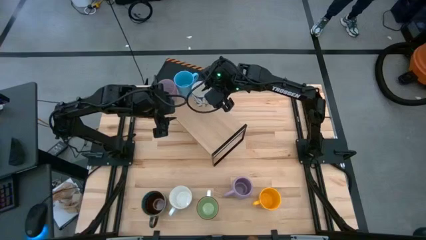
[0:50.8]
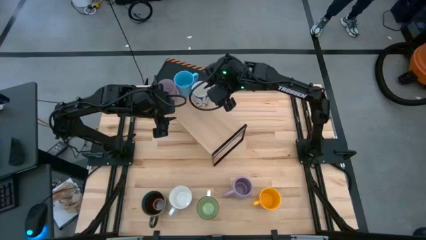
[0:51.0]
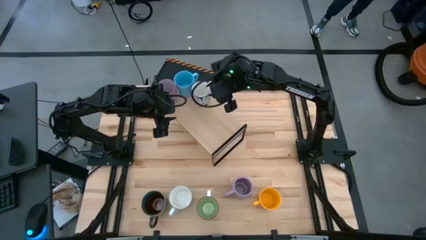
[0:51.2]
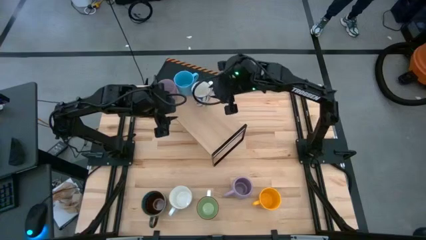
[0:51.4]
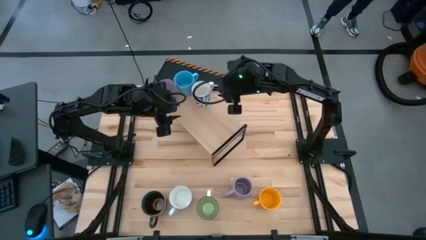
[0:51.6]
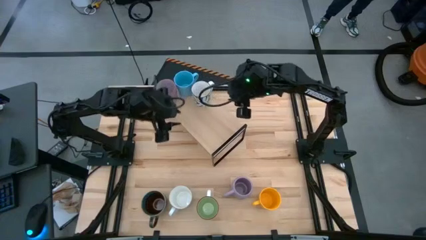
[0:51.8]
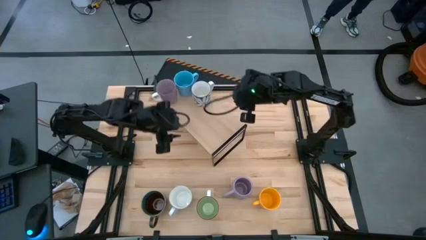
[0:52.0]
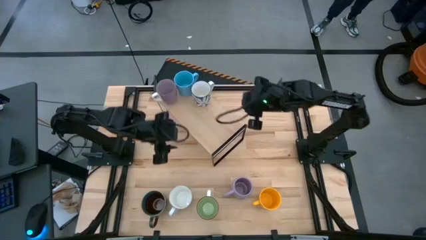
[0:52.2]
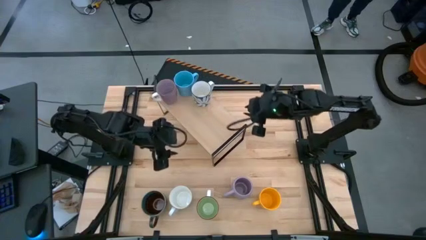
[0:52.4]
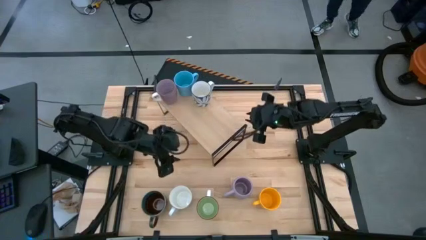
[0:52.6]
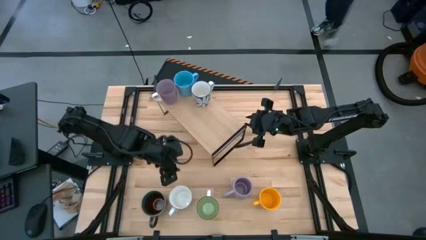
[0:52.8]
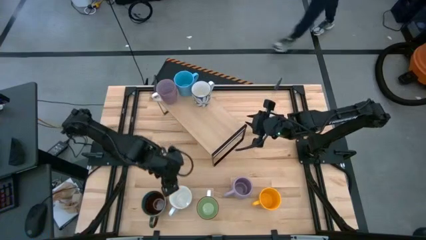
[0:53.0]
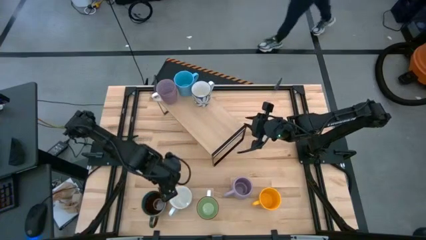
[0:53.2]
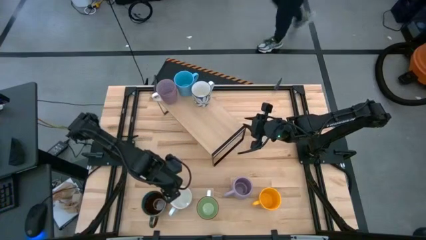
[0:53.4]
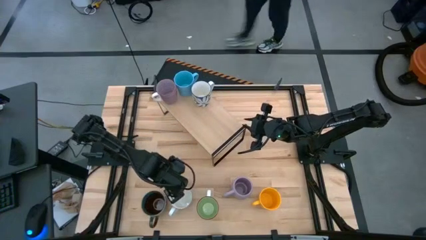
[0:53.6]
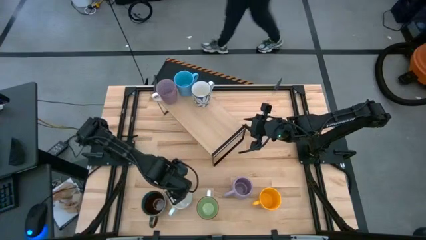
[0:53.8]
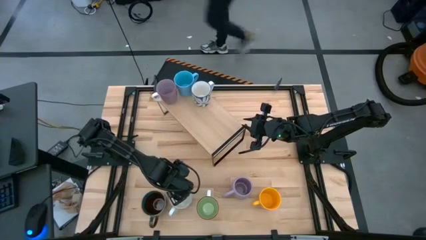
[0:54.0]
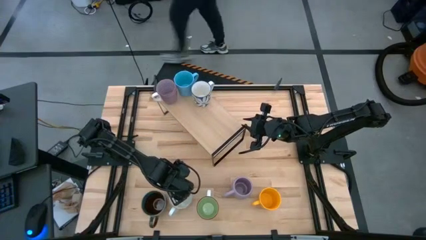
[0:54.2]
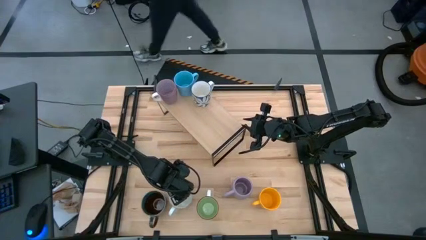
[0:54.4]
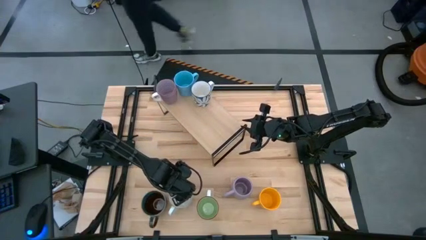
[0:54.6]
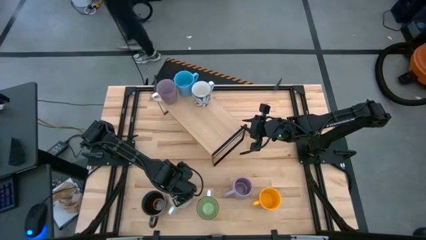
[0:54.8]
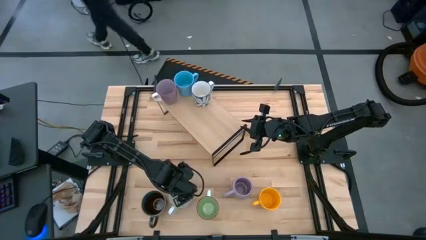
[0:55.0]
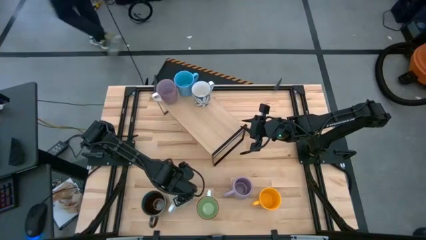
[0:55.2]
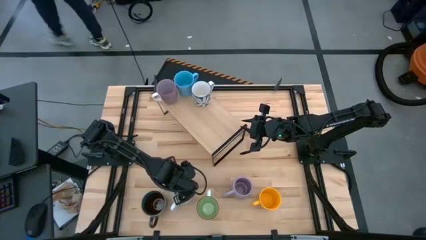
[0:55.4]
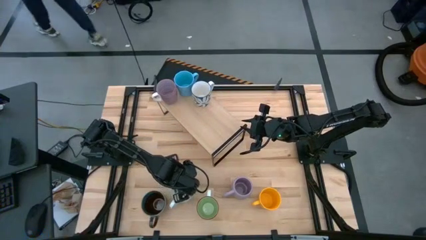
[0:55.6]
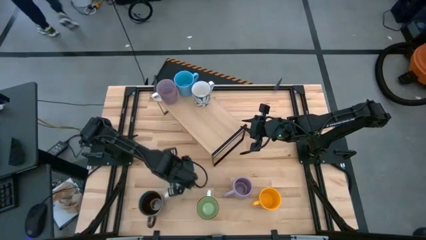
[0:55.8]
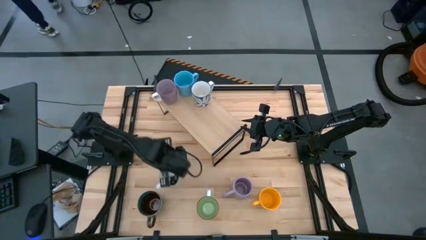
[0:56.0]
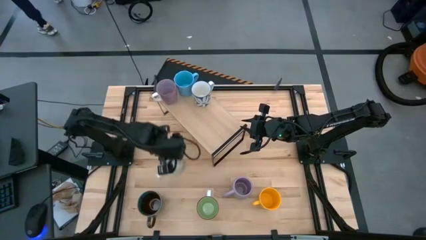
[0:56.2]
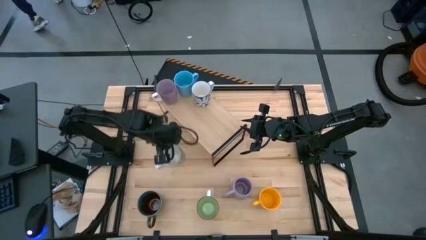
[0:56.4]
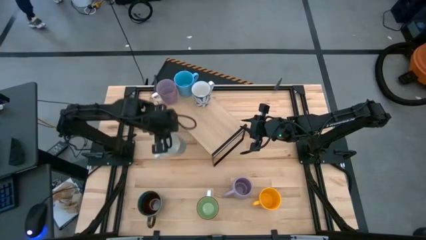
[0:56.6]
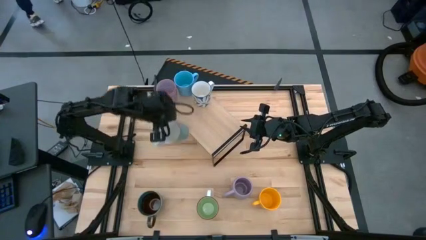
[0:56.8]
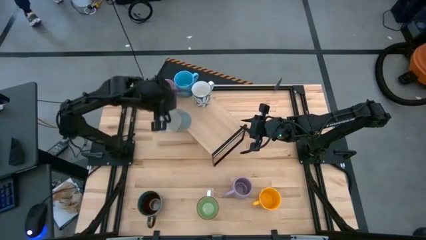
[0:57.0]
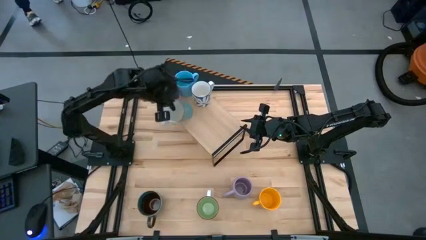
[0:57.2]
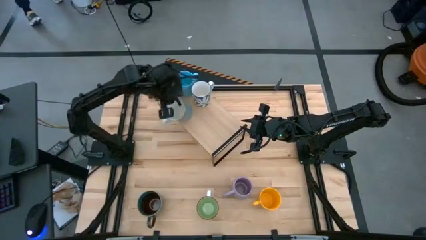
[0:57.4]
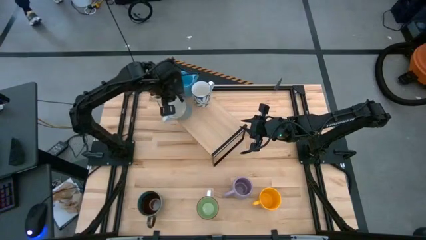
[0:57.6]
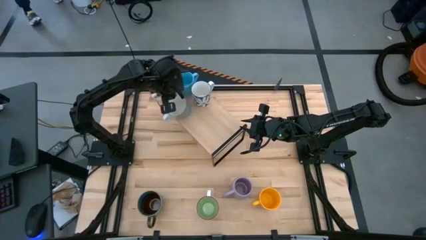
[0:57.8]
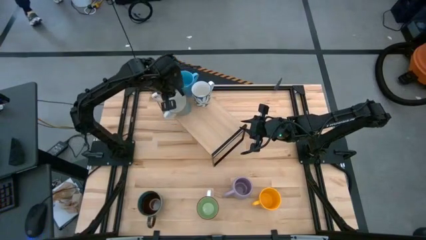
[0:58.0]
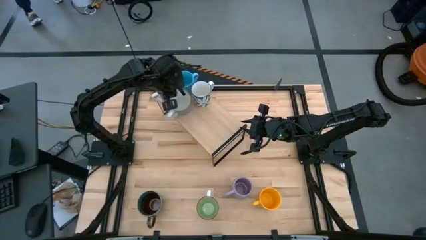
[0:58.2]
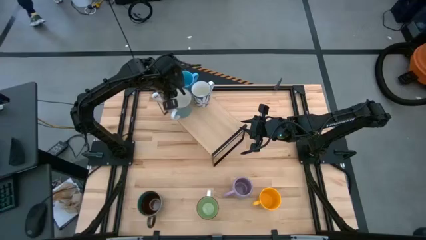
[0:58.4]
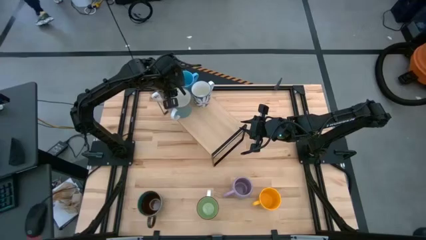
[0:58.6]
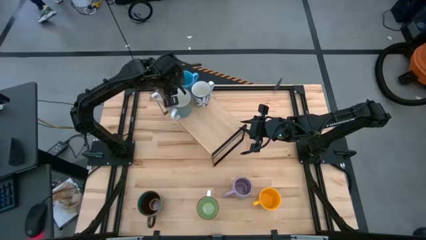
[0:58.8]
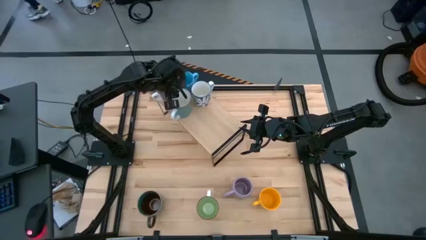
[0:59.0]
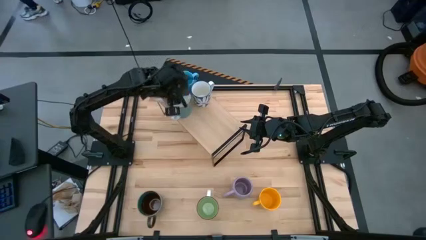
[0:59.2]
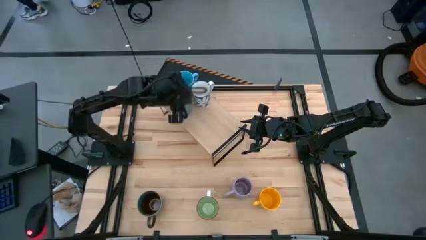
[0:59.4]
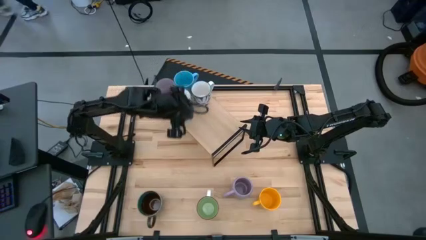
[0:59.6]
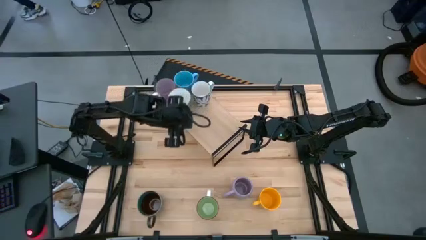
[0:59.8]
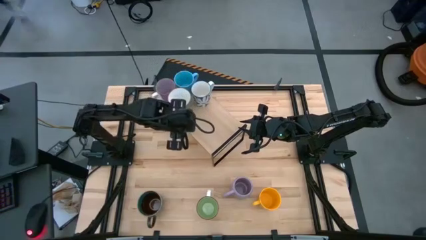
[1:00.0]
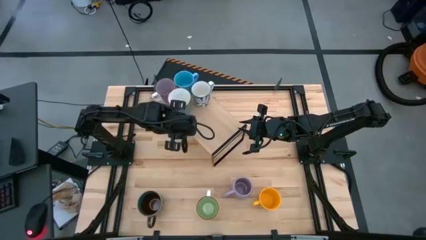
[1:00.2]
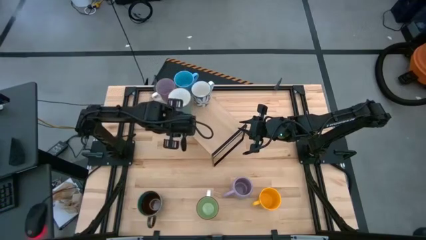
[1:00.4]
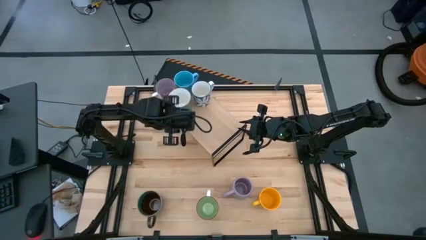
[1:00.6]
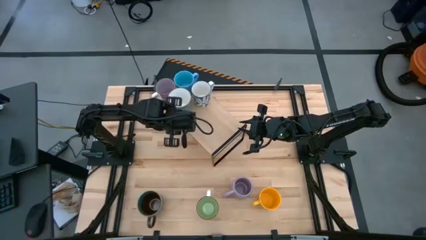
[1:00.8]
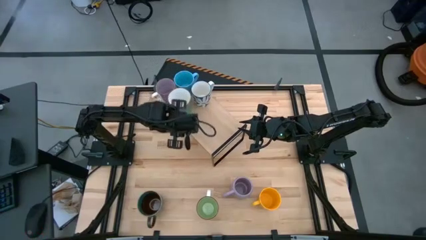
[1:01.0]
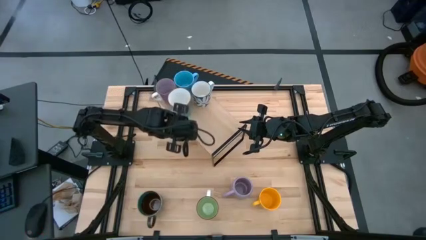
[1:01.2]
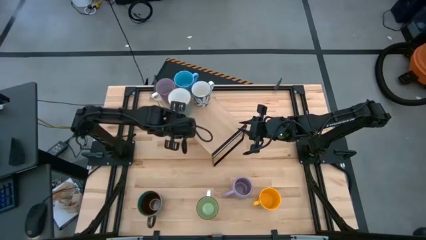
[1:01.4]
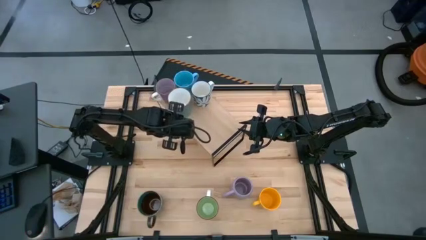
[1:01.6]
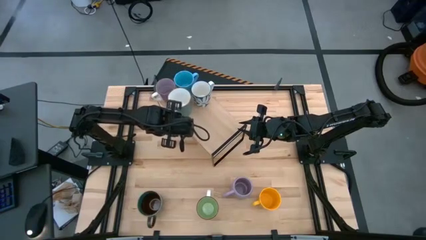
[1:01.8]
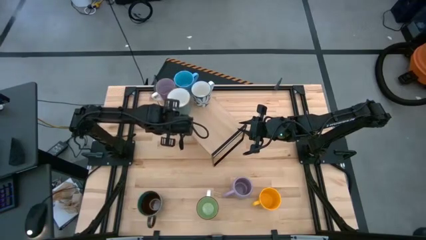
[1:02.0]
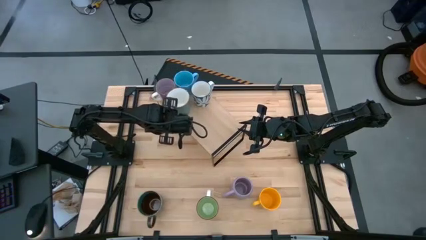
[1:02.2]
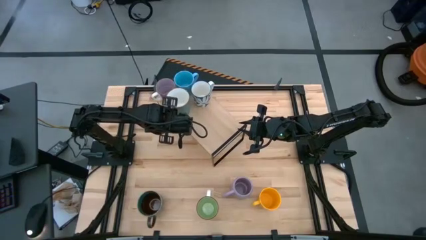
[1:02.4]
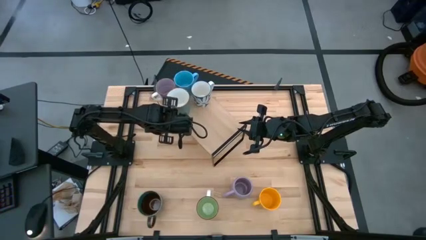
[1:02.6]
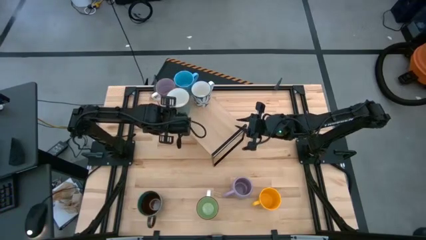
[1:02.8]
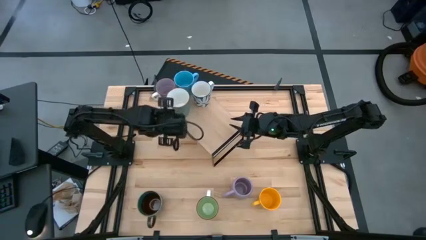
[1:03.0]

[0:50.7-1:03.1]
Task: Place coffee mugs
Put the light green mug on the shelf

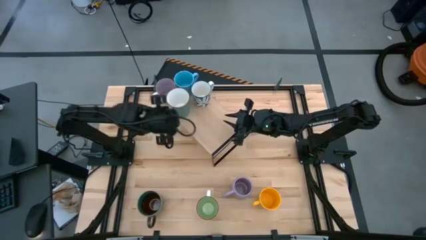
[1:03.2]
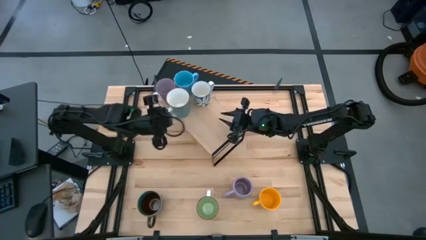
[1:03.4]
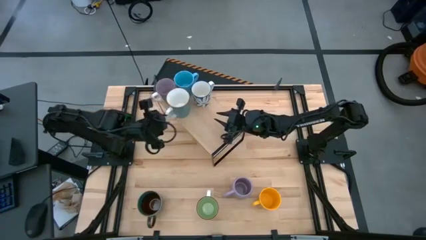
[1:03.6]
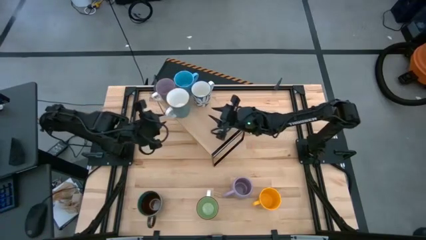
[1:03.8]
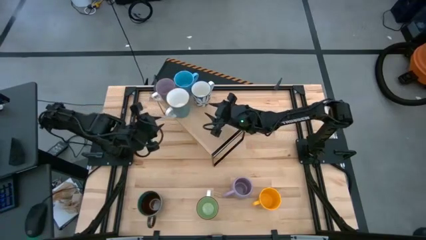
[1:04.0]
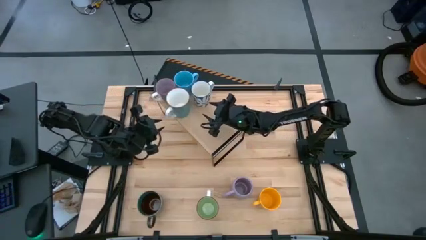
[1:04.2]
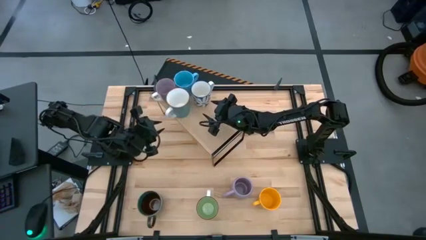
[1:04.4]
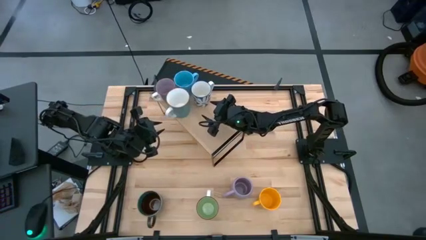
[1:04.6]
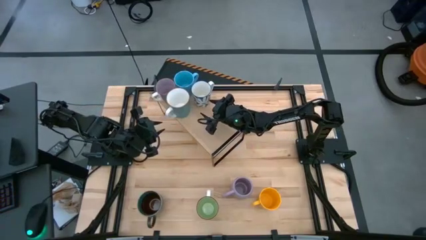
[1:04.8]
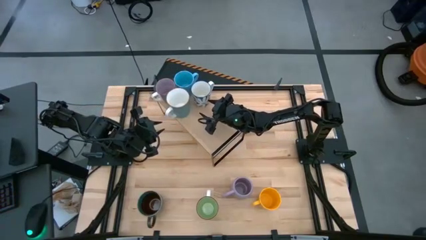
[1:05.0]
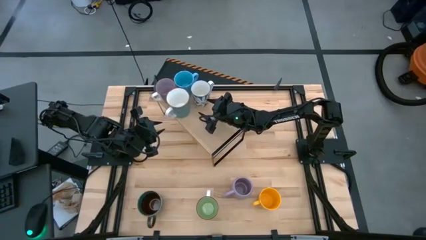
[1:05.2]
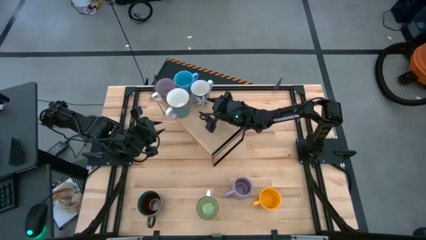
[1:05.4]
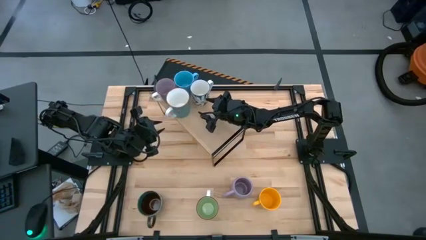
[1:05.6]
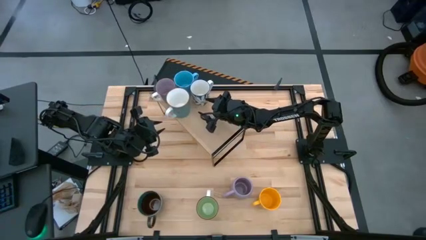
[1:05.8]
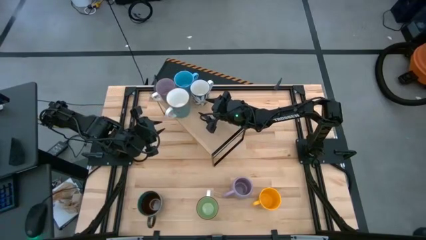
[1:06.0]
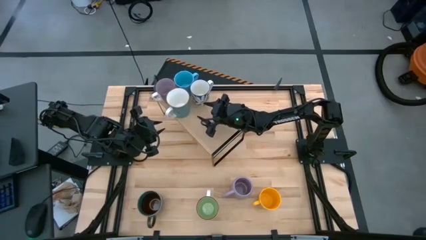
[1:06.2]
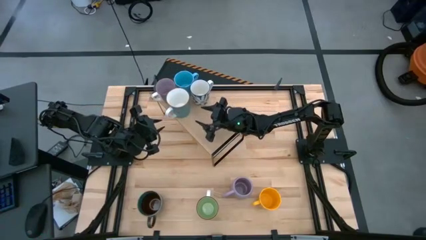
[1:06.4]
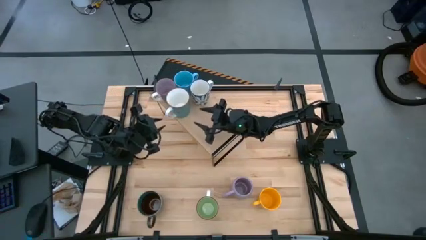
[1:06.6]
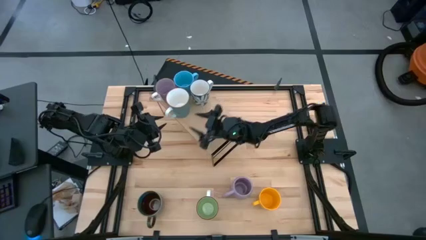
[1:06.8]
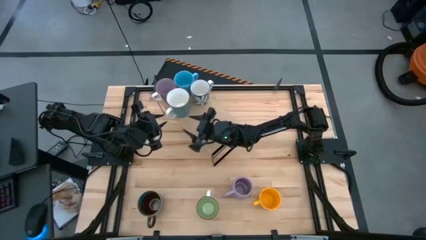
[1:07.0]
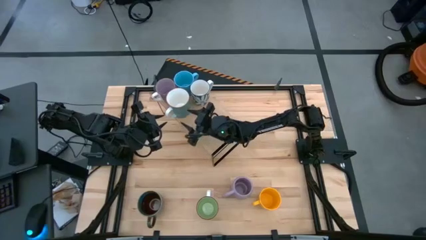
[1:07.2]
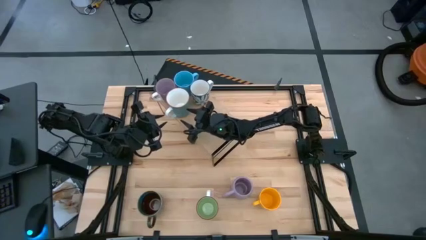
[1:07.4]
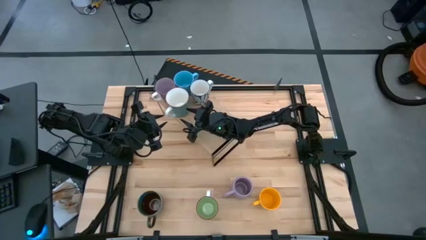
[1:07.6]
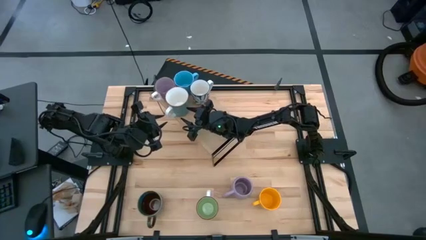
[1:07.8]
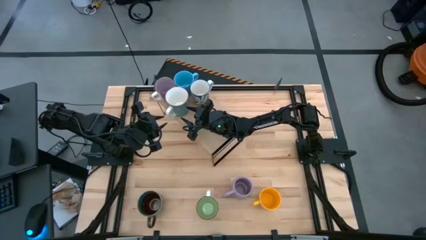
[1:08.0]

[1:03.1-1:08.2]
Adjust the mugs on the shelf
